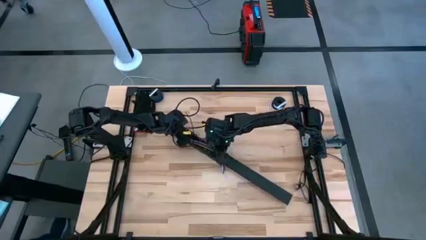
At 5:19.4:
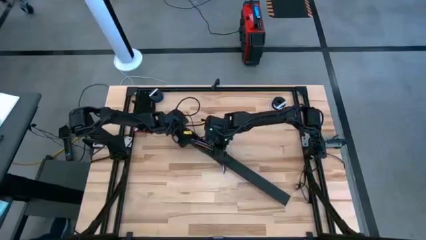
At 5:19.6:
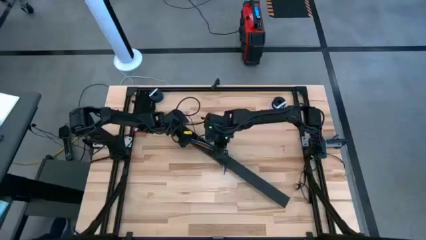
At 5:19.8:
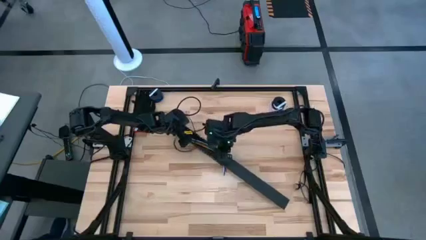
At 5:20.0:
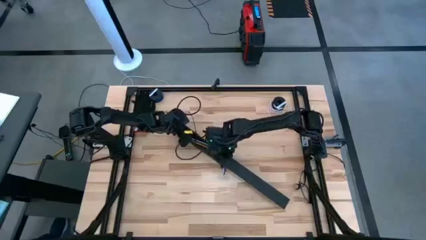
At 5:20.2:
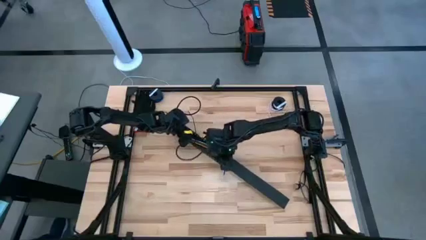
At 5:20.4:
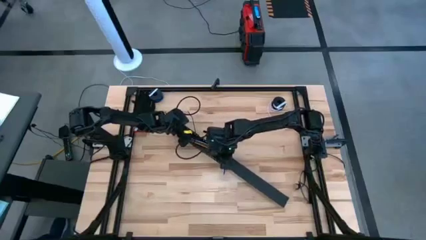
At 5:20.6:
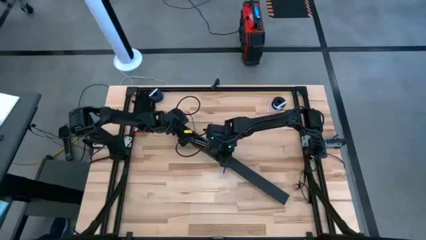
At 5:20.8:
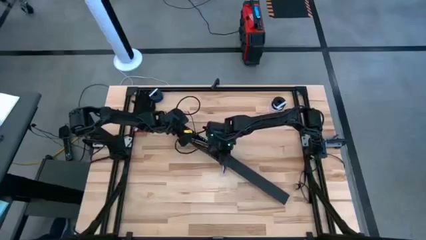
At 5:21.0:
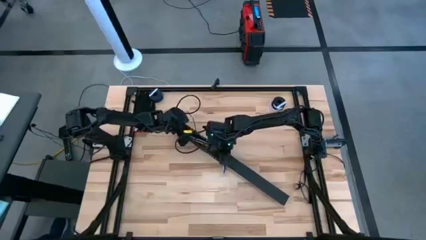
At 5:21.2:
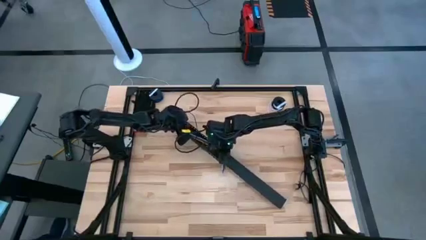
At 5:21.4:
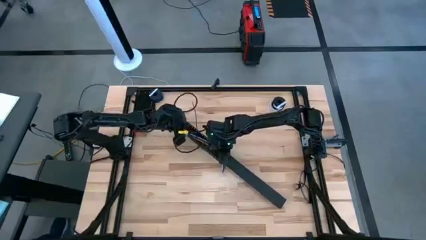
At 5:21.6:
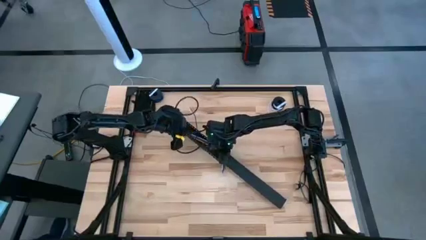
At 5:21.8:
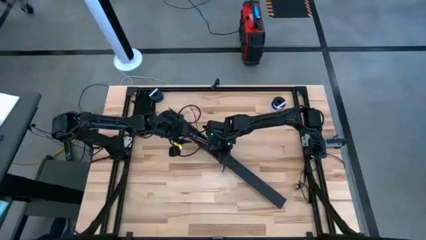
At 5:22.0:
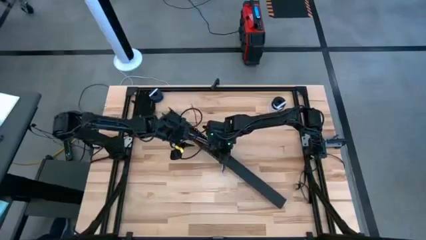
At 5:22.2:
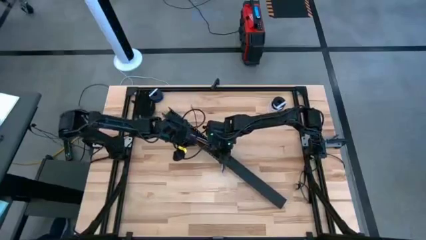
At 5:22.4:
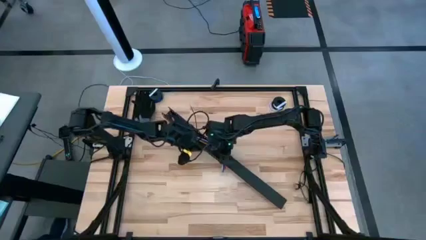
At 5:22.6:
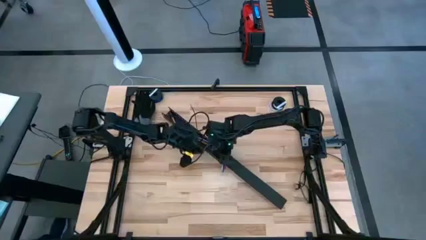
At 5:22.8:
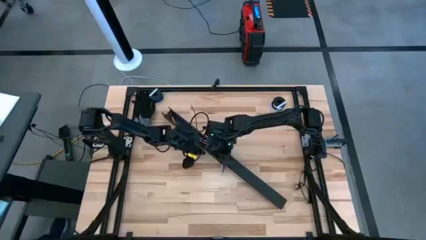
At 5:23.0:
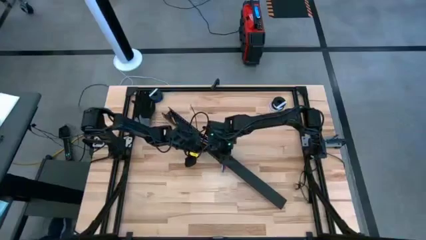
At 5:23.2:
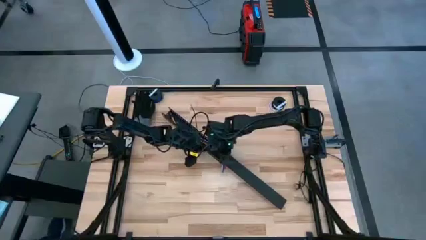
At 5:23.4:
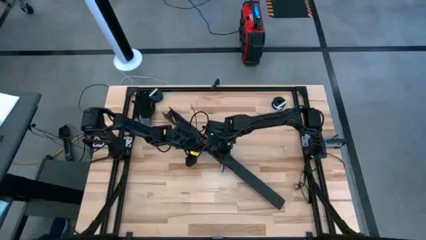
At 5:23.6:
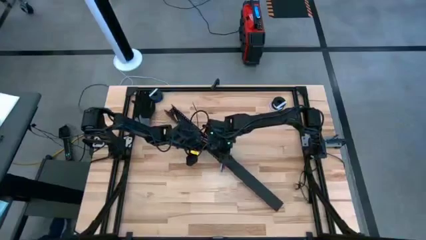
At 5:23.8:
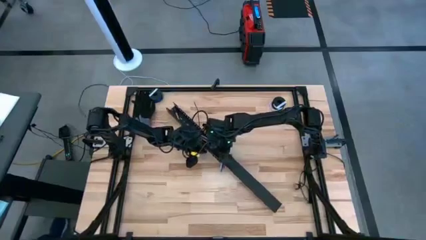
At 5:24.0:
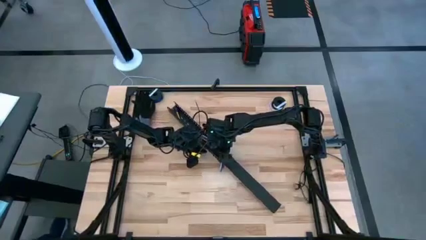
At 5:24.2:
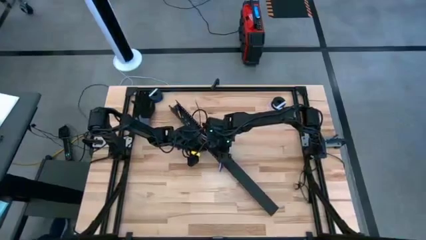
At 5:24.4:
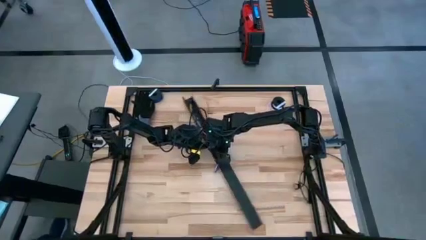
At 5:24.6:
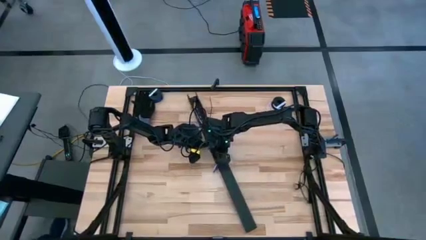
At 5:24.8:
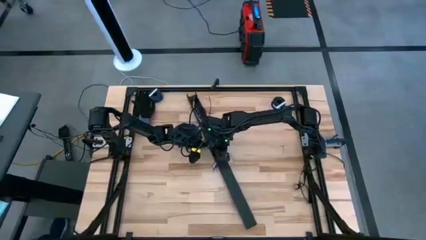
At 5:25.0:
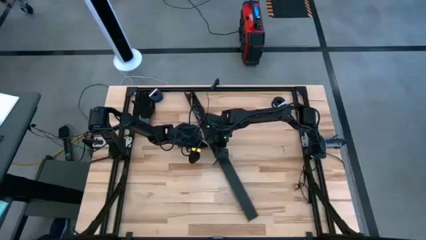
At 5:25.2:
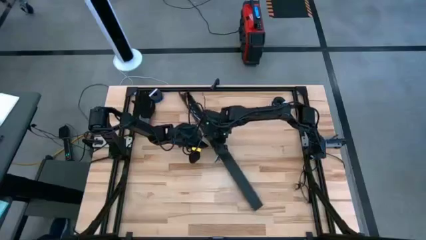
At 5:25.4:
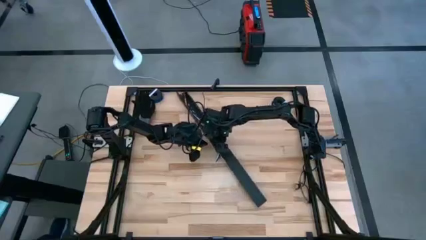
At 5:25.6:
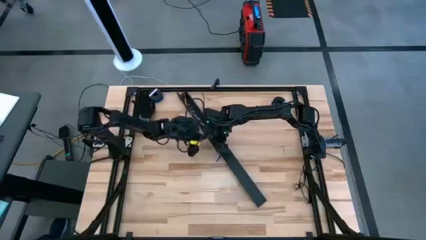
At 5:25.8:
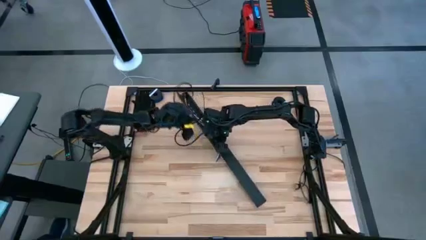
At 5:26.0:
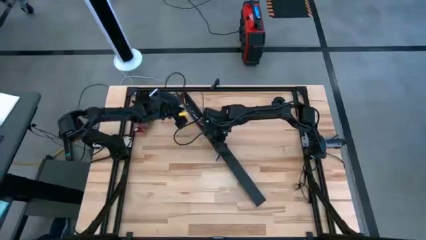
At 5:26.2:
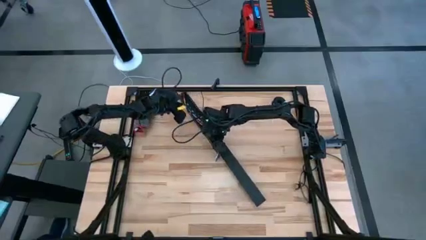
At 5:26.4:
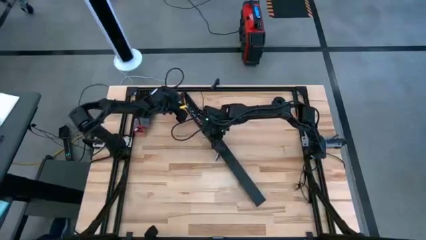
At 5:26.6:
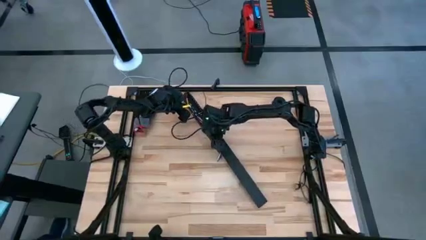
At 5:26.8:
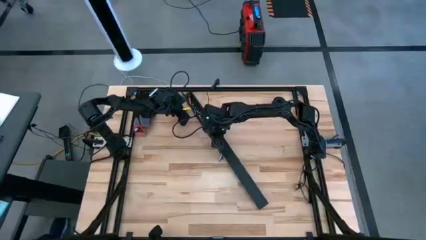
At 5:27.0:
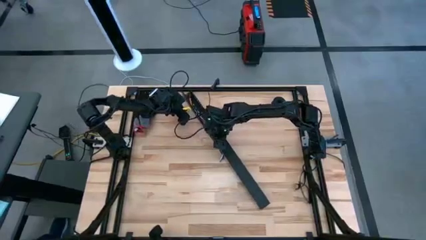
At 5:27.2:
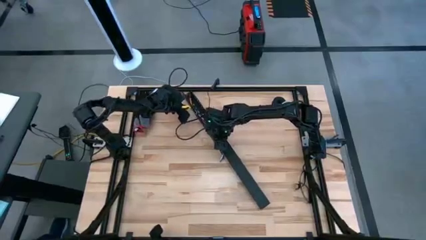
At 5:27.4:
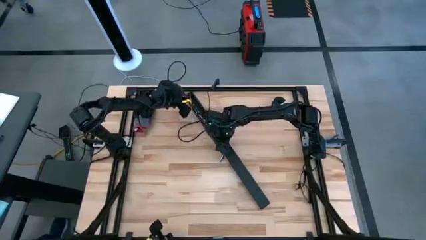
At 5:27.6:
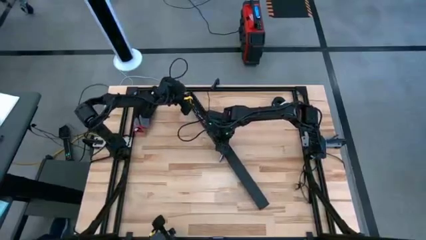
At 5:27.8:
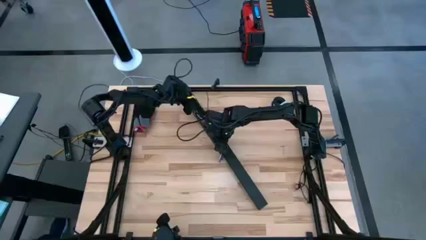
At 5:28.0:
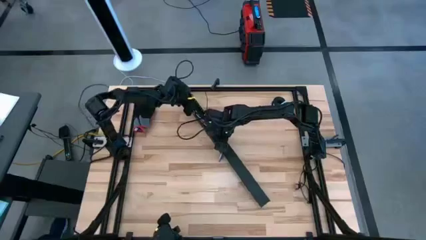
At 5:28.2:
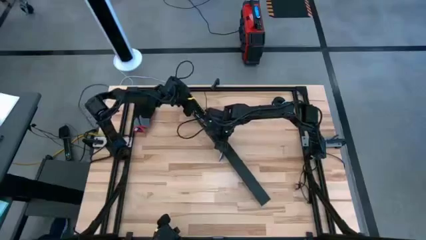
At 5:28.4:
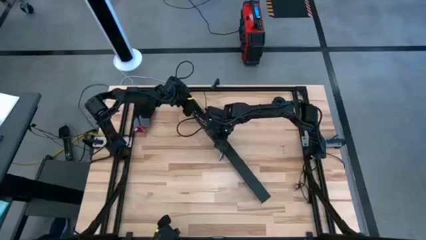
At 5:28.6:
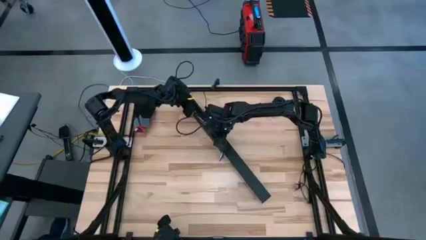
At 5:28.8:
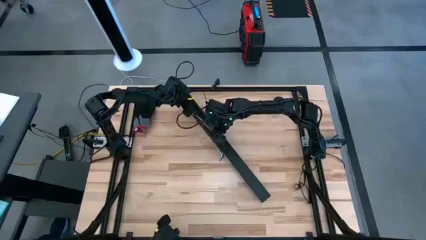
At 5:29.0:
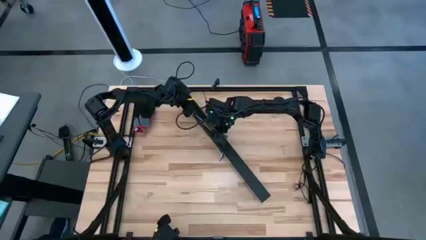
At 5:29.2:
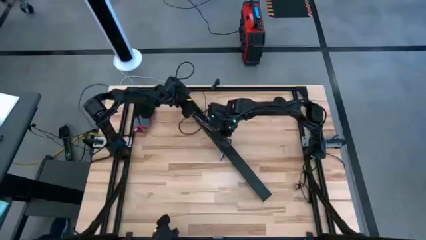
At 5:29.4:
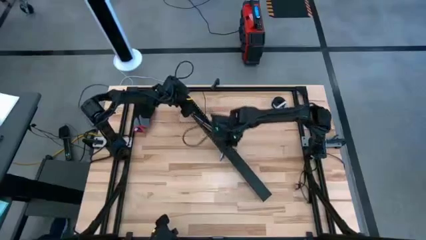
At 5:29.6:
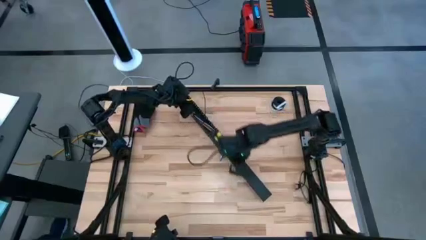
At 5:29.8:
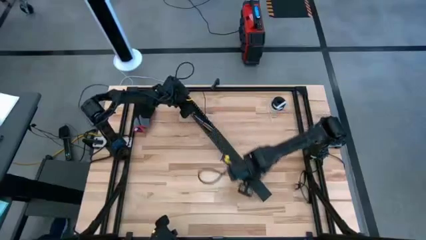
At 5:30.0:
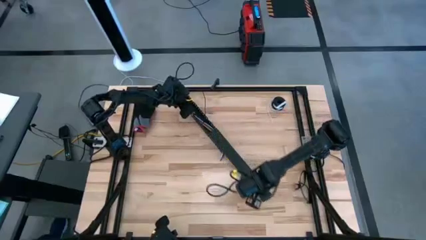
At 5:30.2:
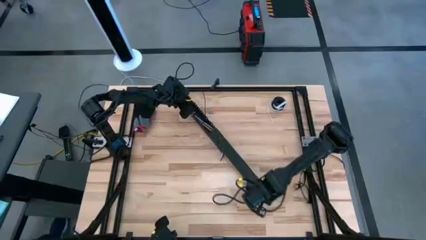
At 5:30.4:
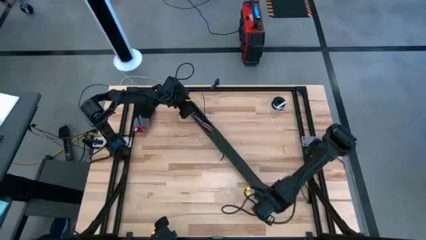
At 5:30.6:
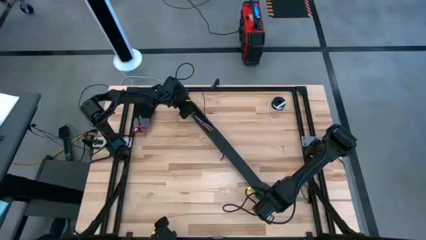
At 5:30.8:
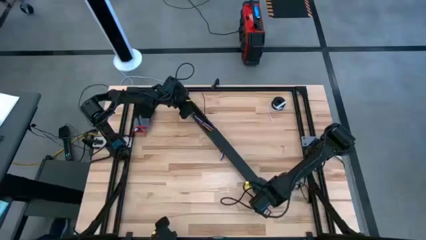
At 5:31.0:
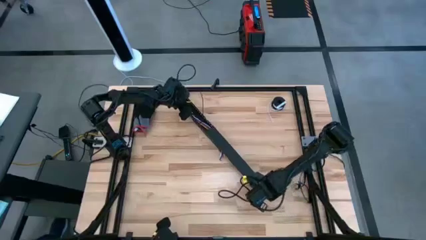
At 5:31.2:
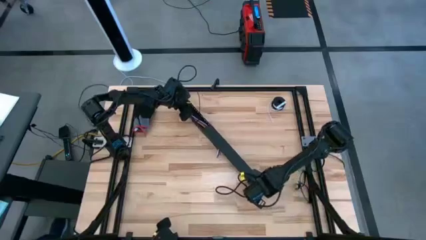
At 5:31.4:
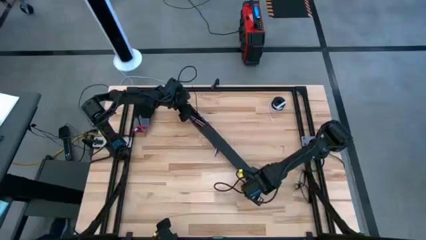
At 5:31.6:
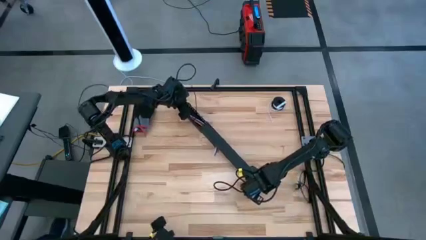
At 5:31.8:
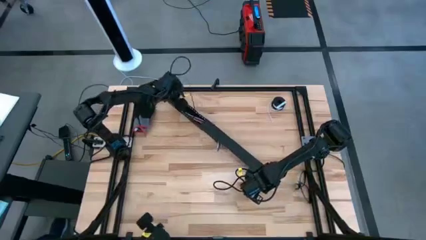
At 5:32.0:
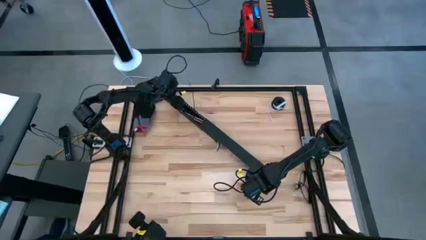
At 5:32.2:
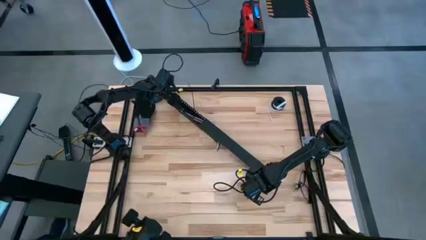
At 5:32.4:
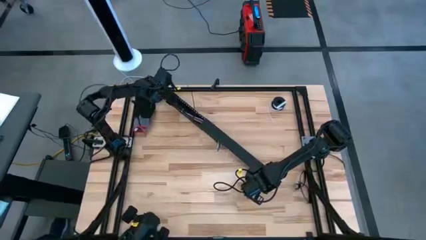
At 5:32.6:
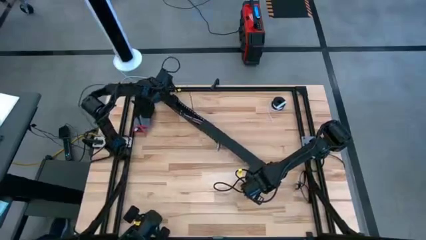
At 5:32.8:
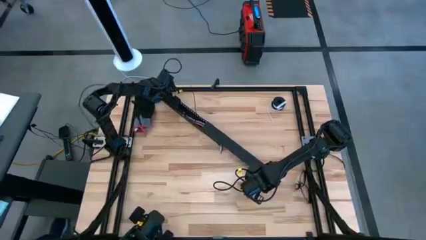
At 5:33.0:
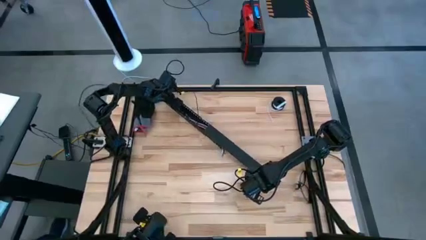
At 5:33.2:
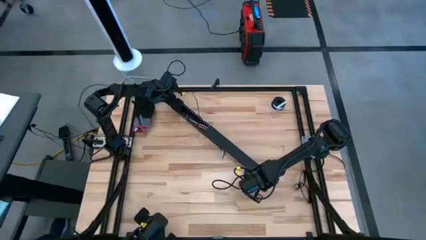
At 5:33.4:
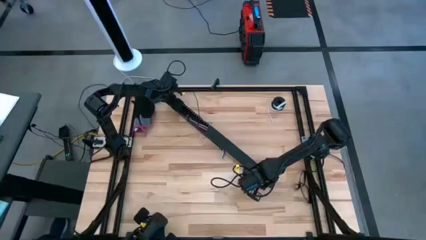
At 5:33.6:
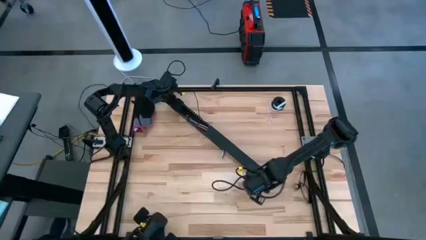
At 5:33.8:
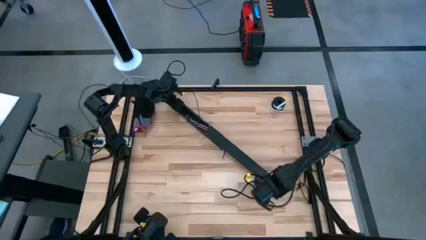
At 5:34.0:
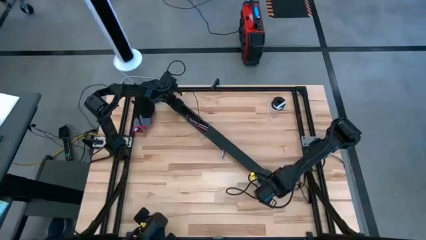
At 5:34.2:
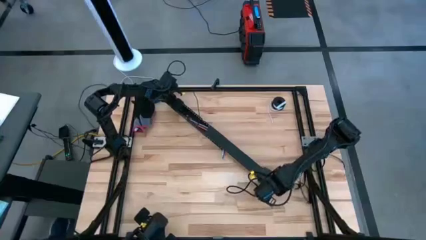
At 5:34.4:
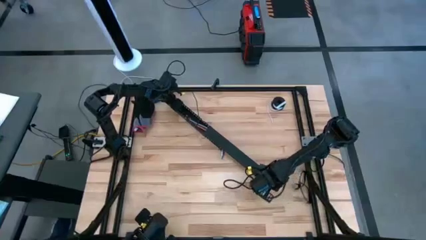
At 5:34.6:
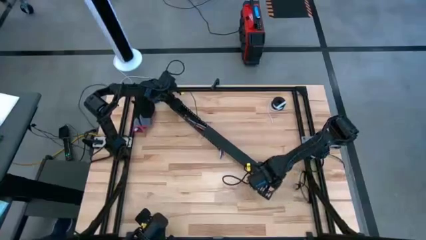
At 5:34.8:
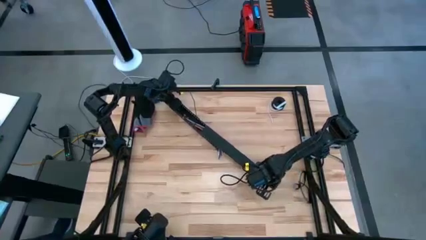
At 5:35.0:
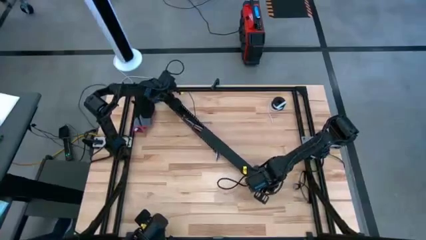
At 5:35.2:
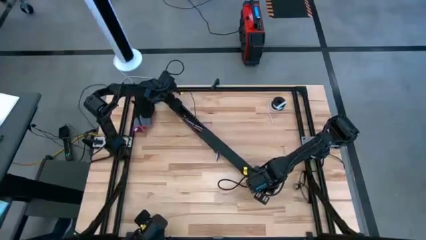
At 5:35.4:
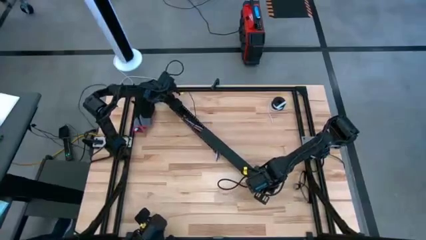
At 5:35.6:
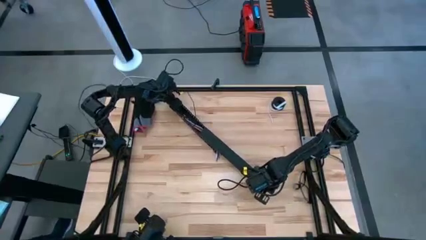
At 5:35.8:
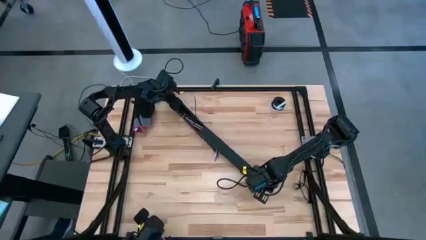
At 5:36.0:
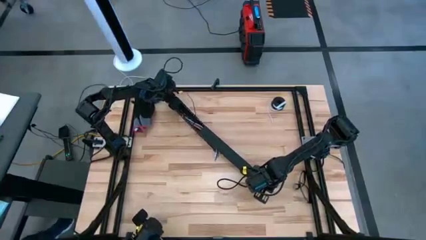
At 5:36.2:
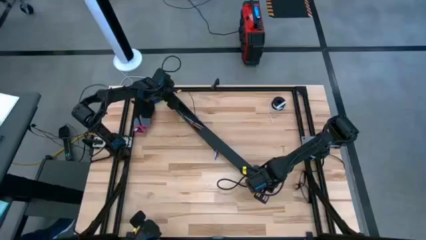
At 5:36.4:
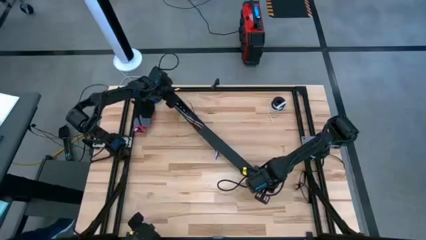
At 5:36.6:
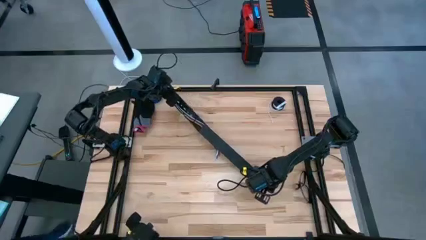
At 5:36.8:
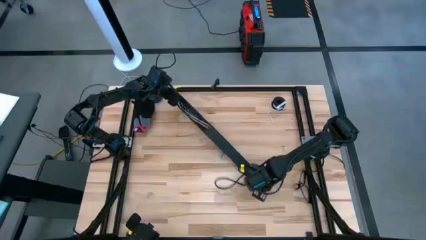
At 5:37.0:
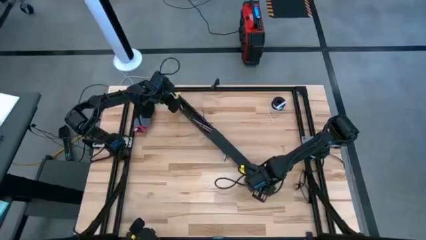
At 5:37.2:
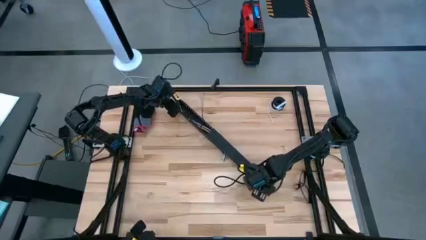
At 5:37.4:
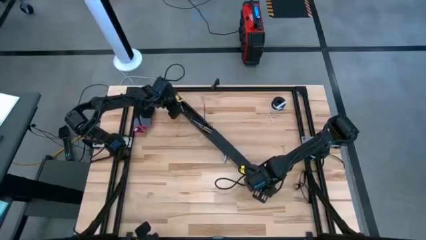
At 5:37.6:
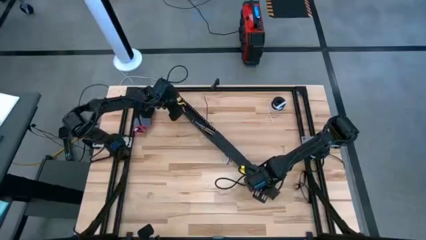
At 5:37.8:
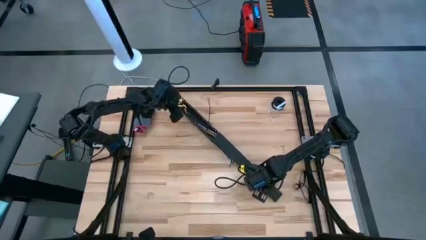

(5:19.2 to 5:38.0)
Task: Ziptie cables
Close the black cable duct
